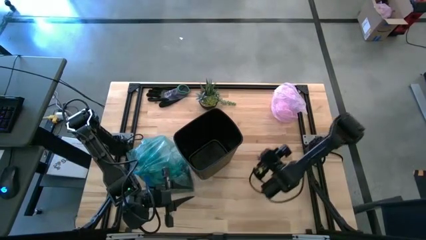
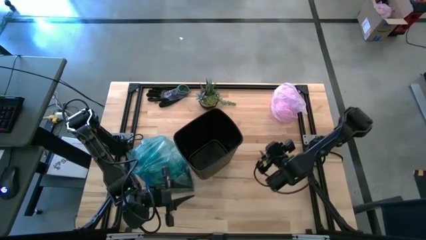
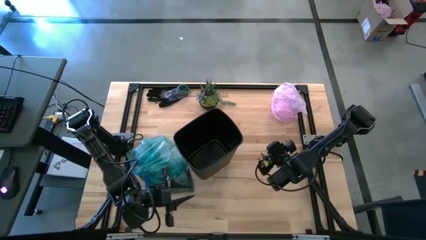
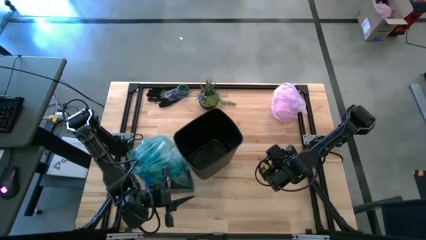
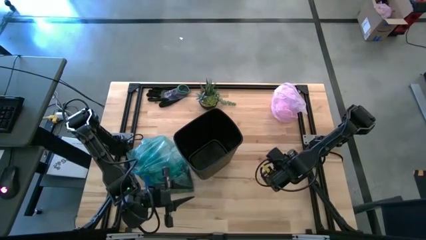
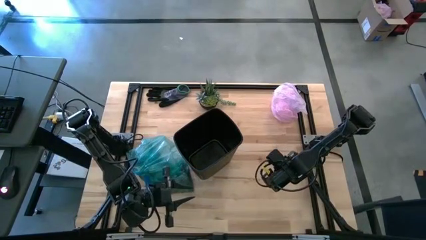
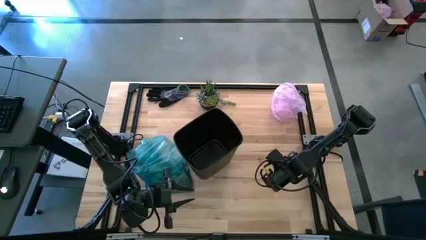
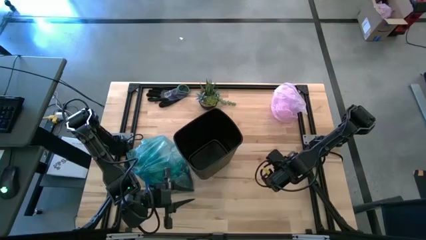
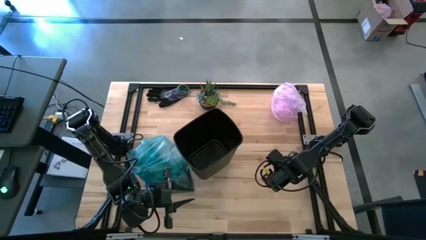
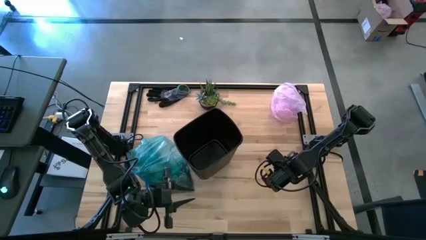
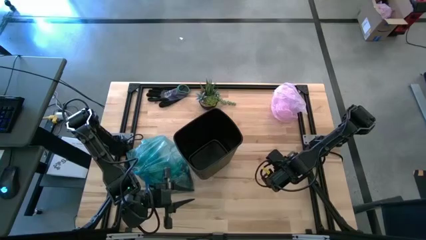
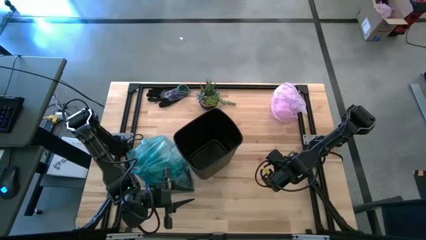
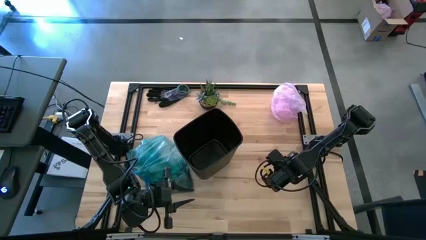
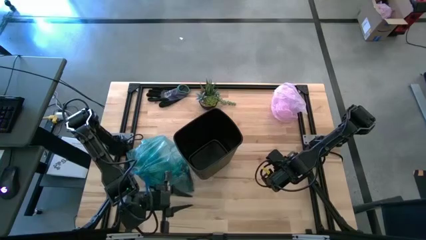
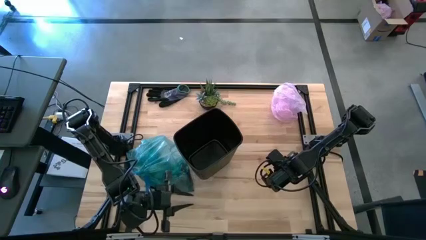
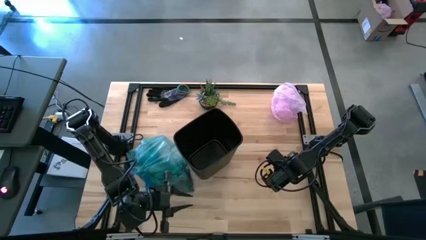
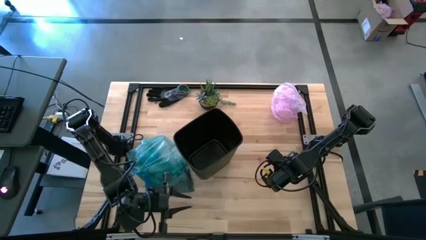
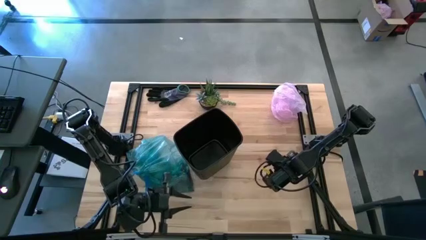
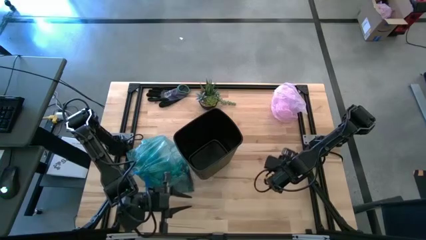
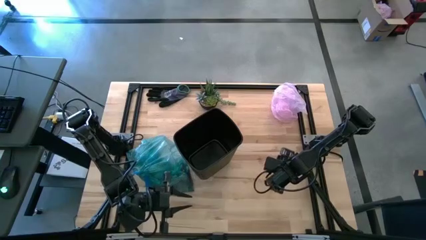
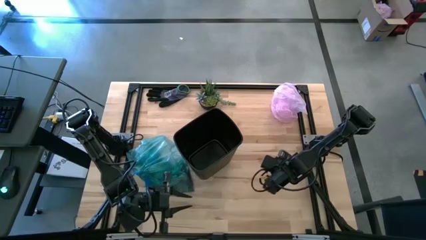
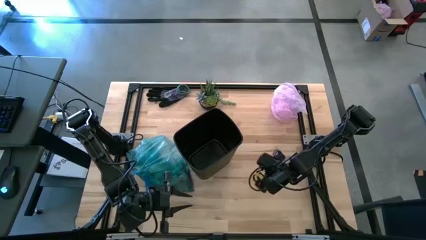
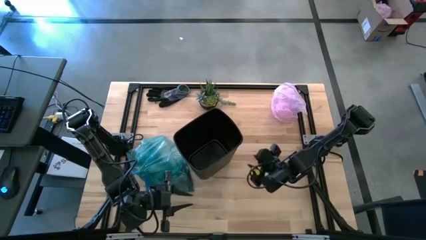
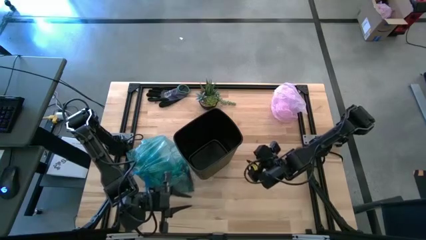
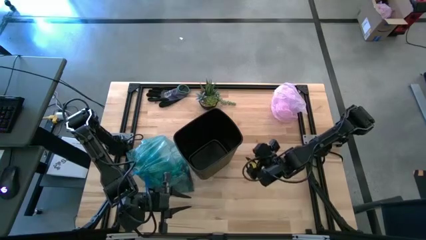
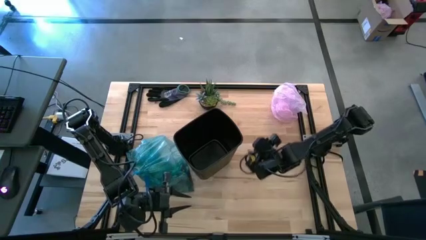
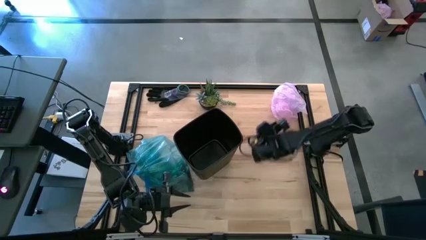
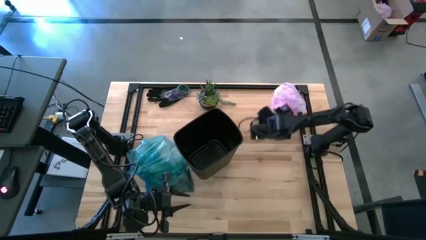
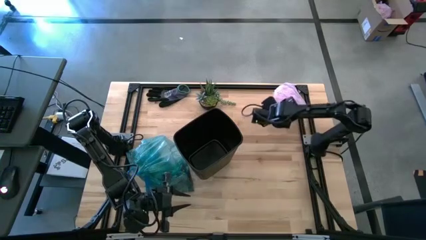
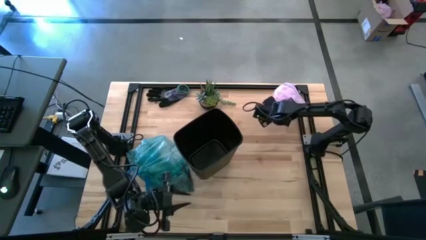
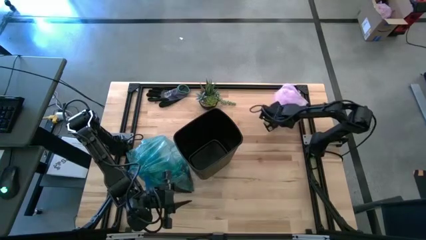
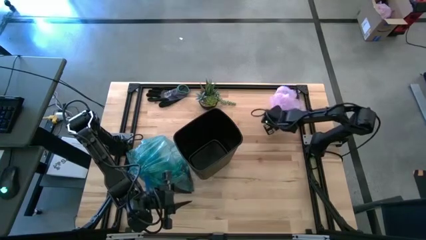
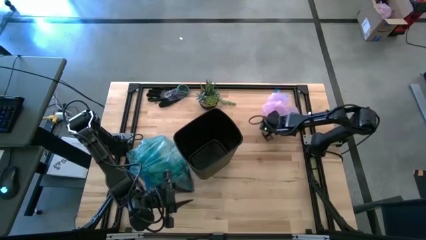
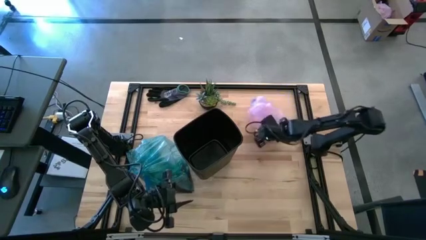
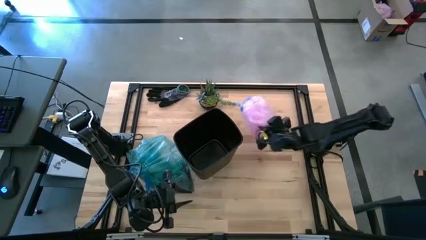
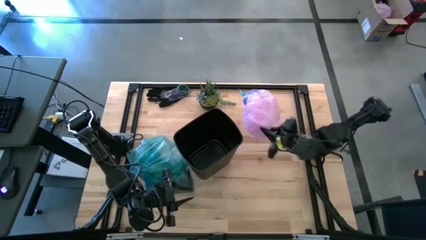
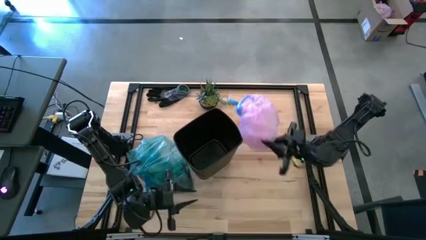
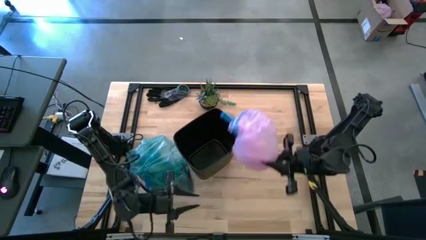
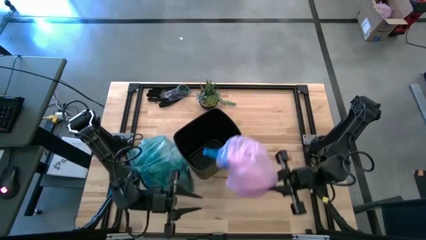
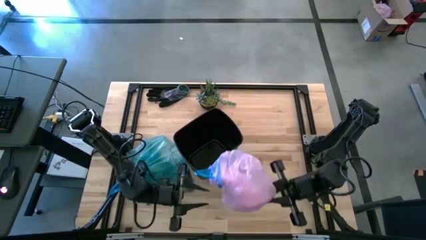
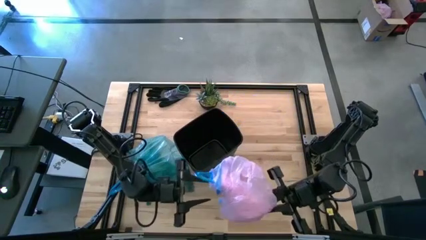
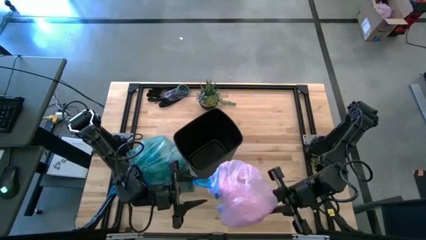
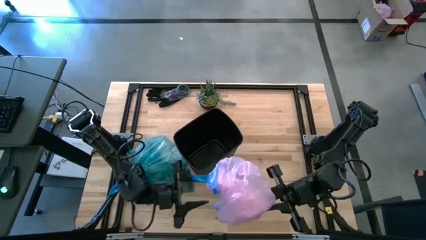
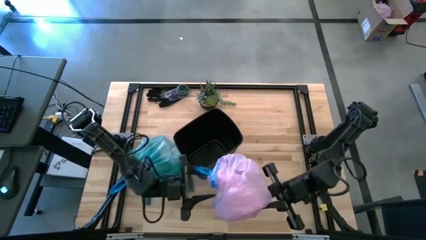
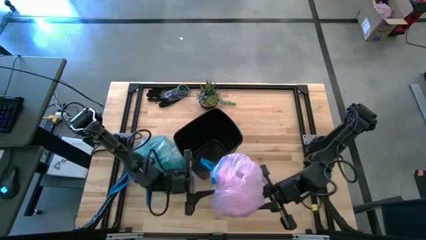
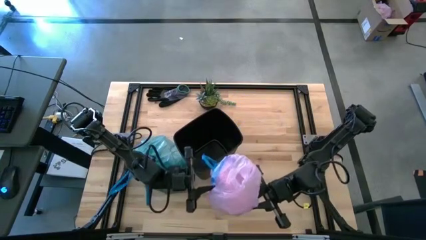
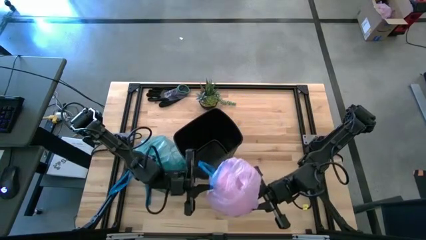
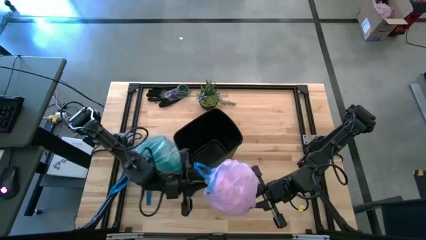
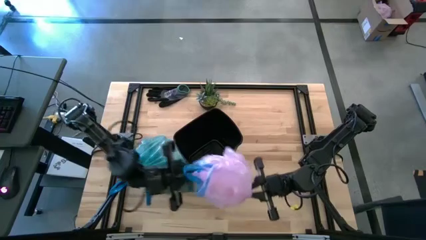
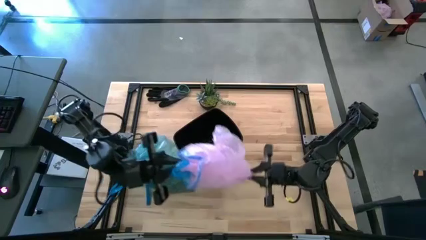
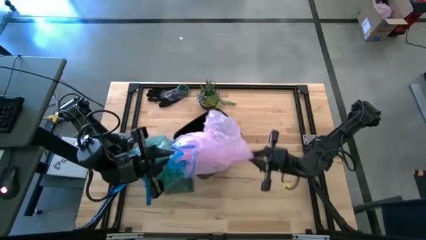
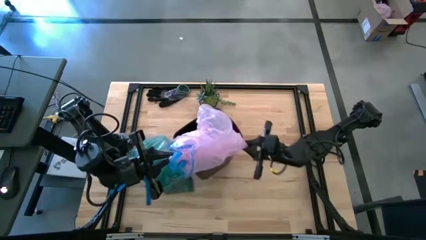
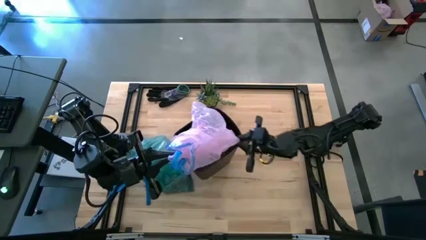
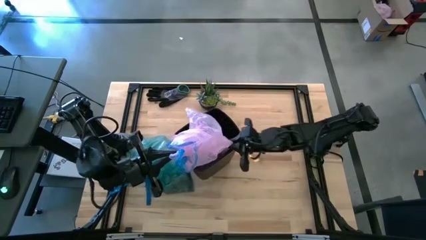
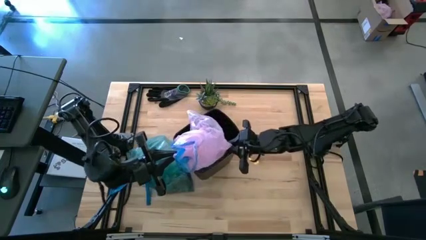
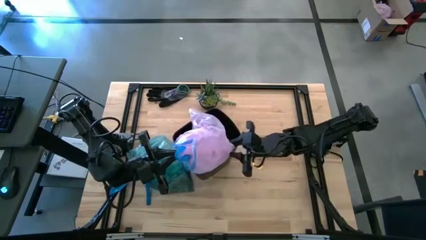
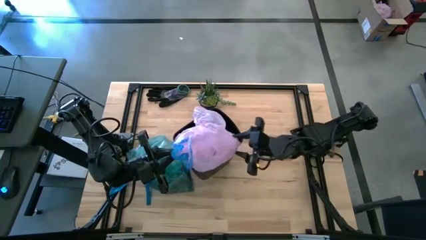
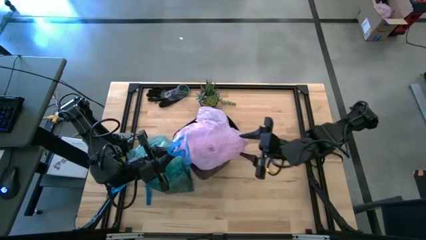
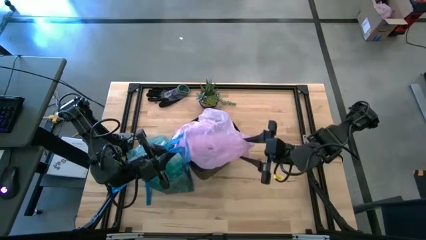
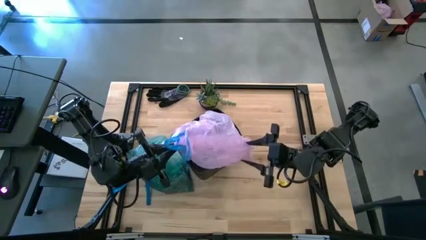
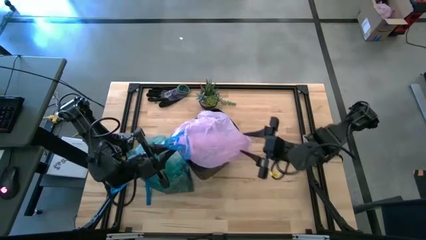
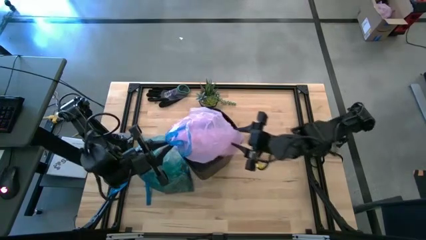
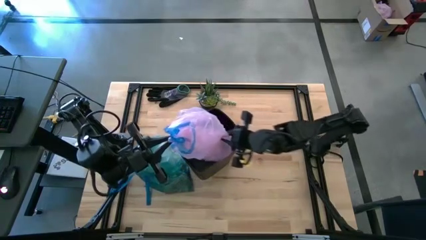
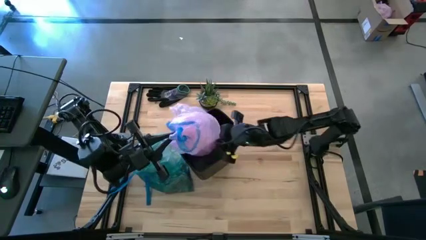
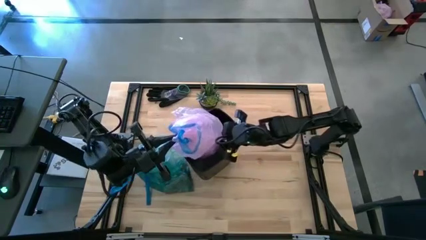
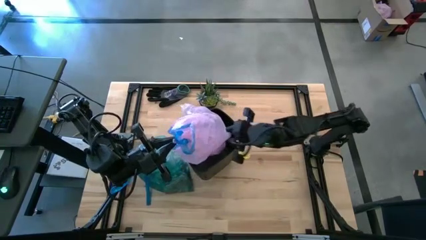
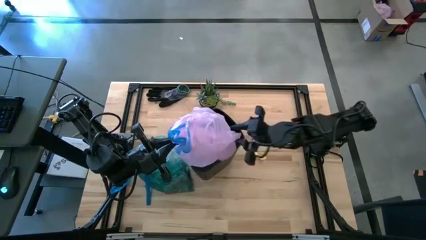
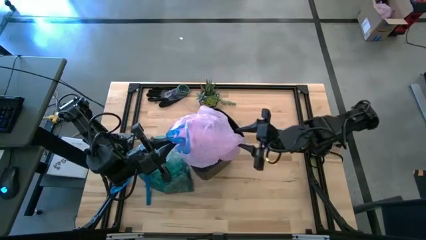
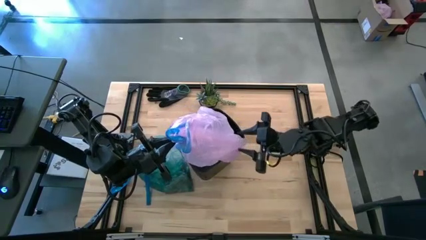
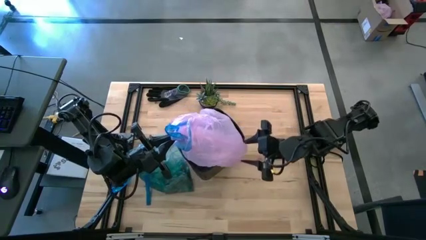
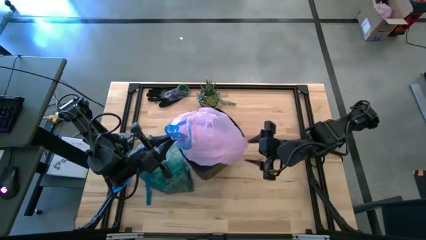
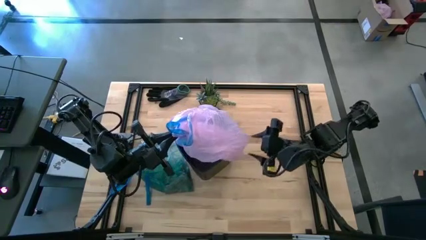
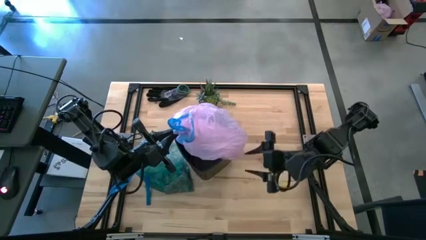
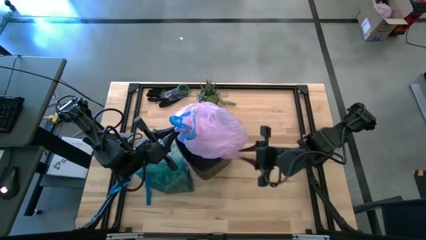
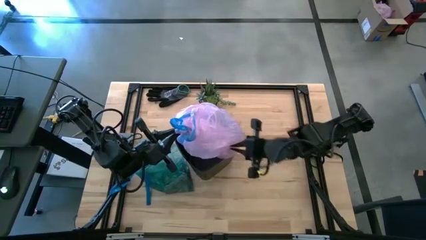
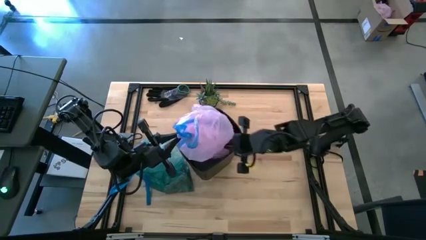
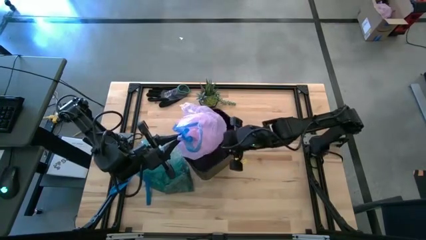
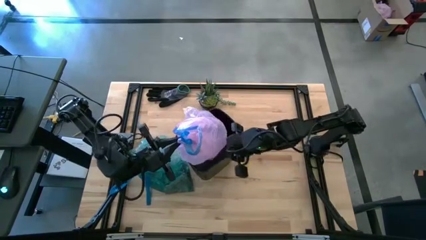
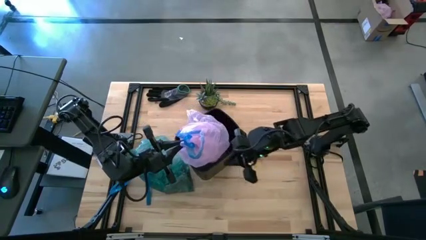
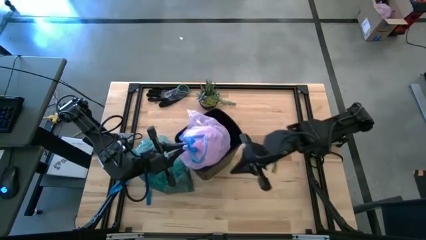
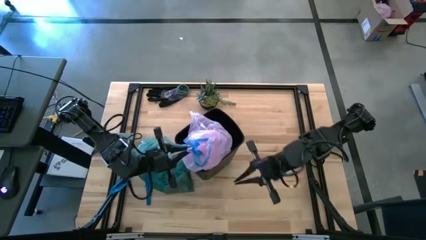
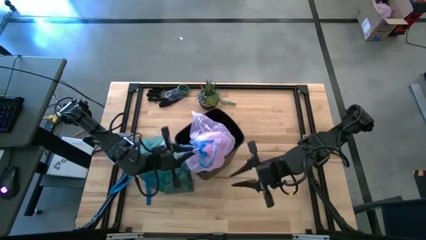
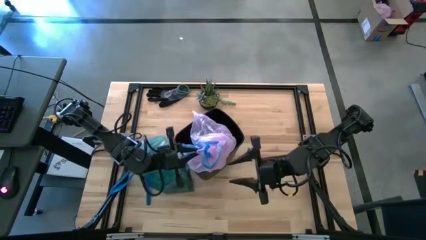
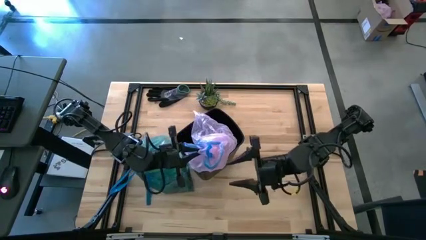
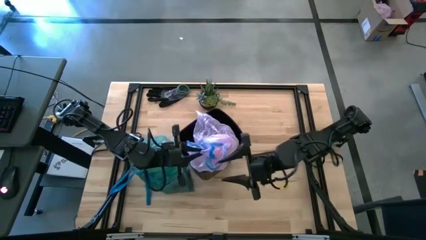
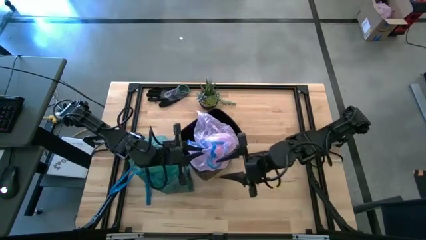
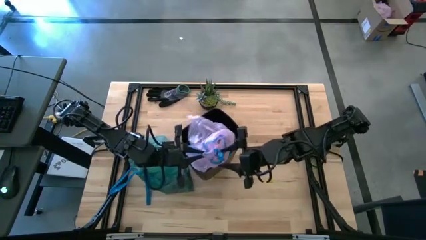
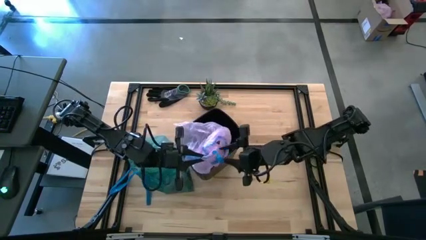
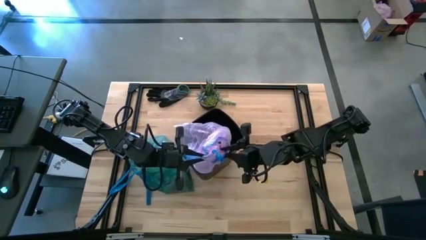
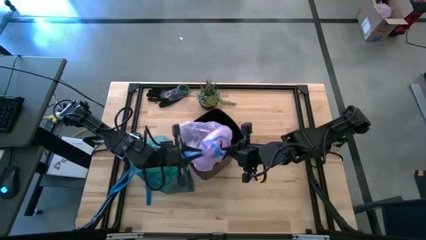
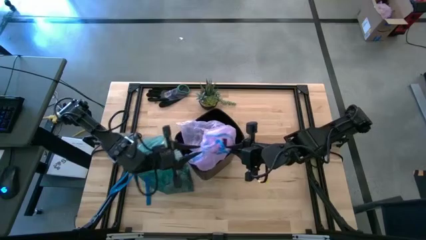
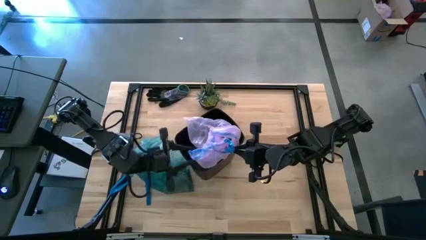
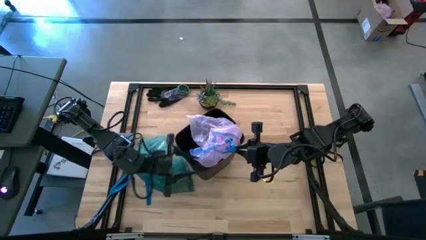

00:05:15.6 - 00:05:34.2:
Task: place trash/remove bag and relplace
Put the pink trash bag into the trash bin
